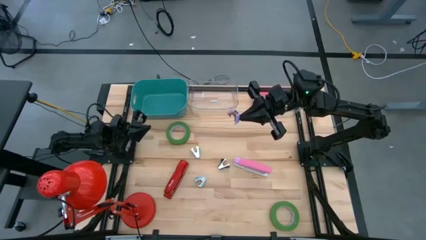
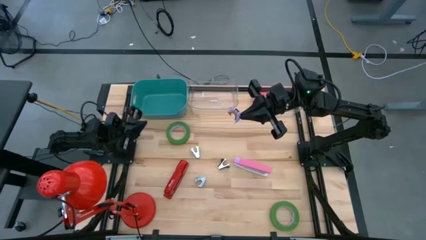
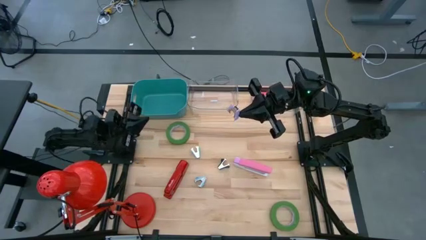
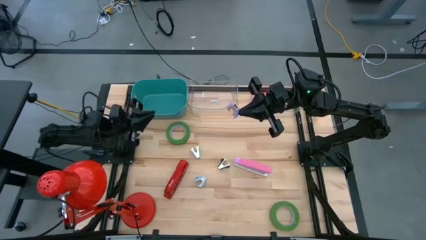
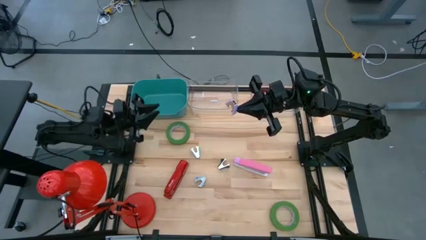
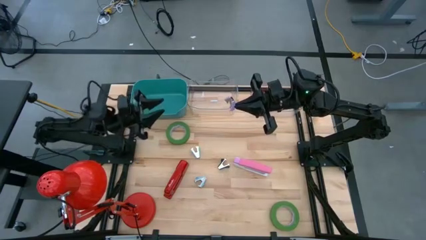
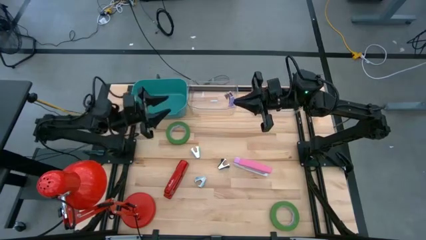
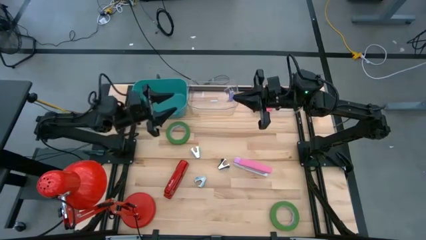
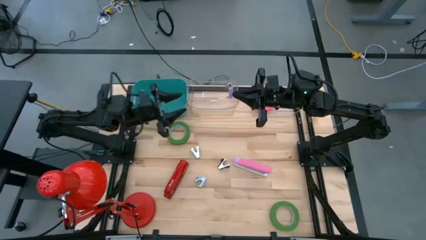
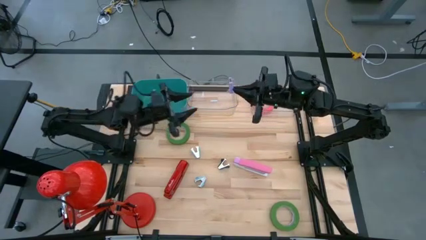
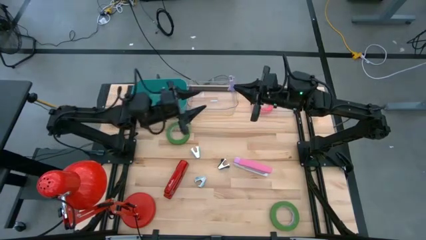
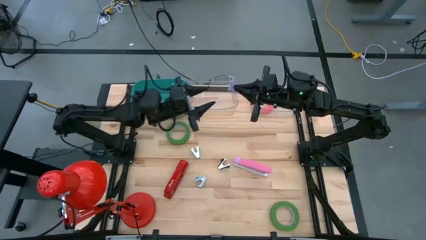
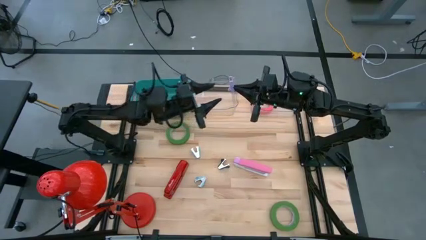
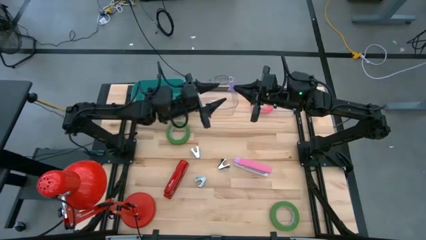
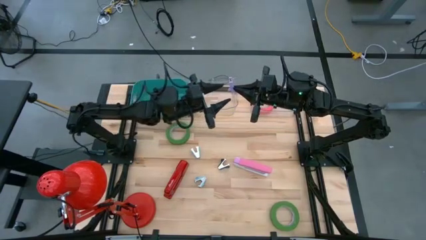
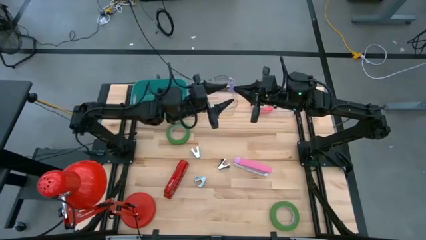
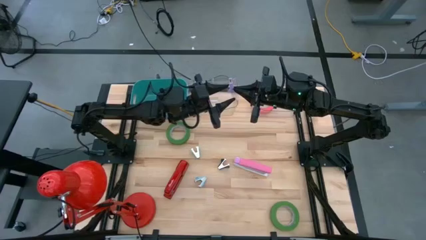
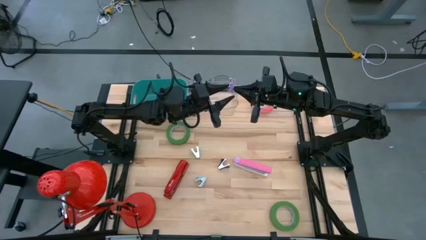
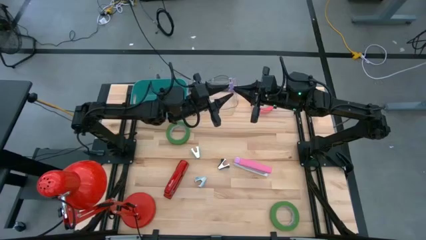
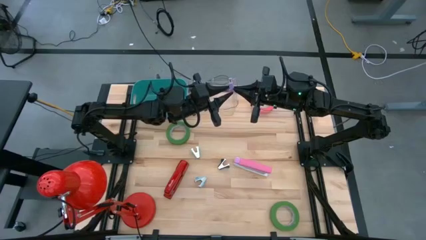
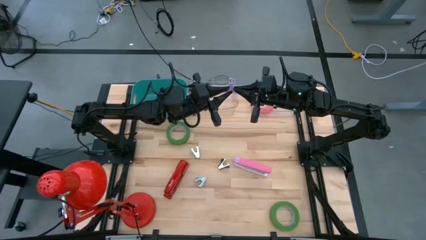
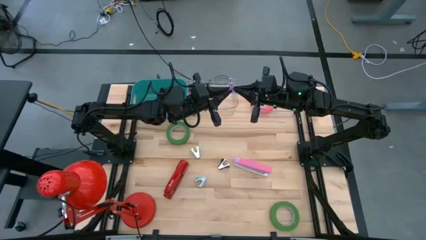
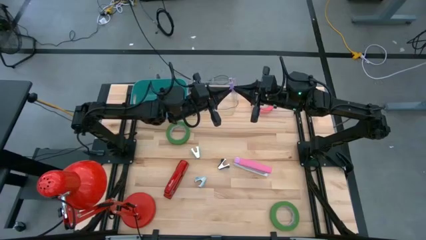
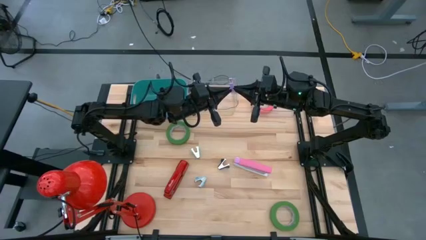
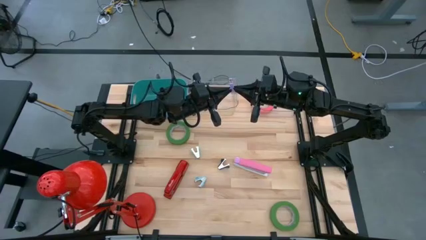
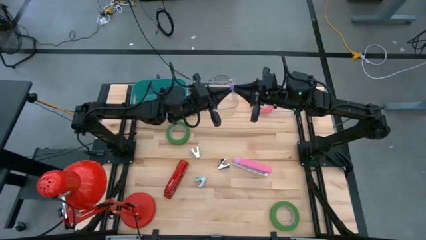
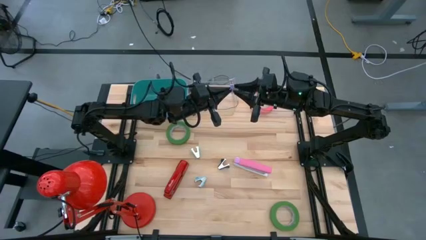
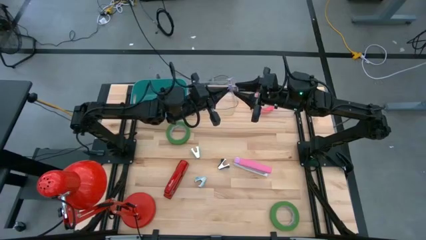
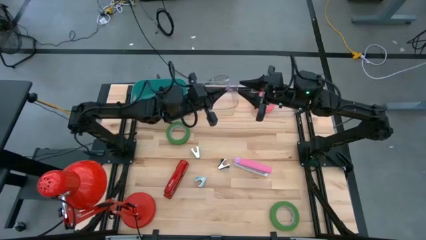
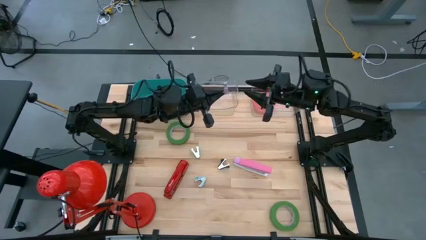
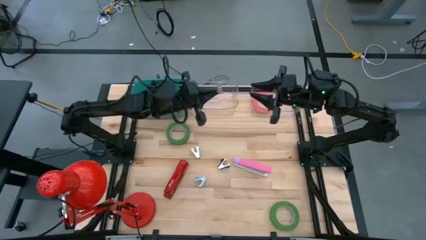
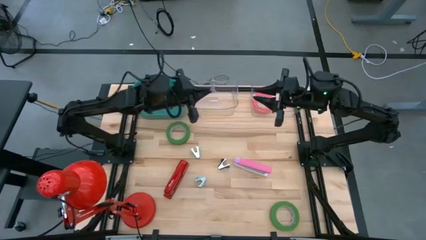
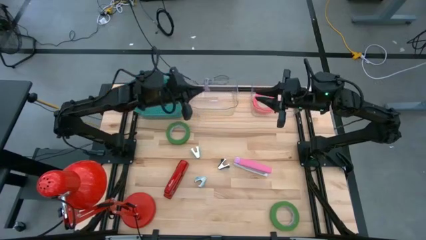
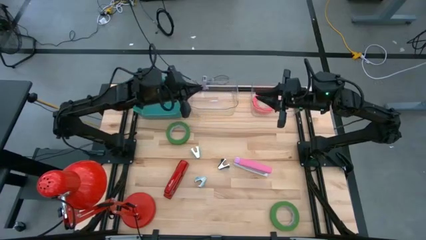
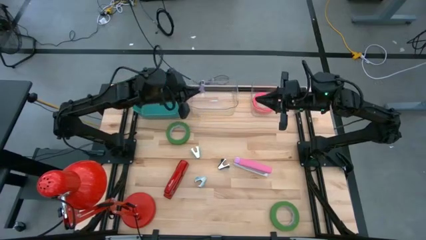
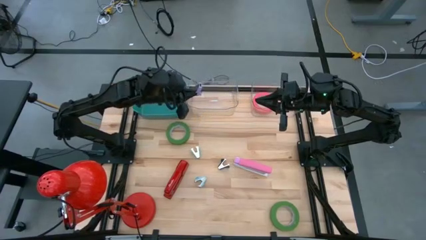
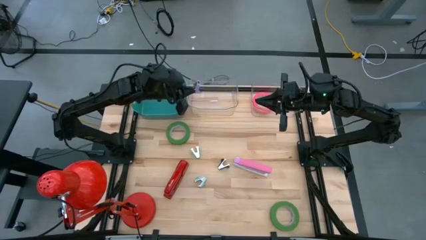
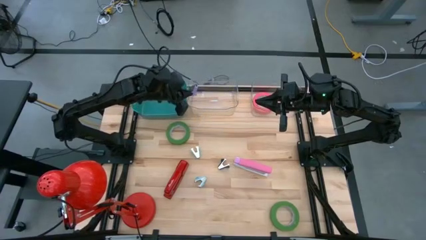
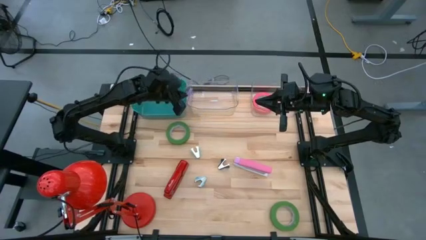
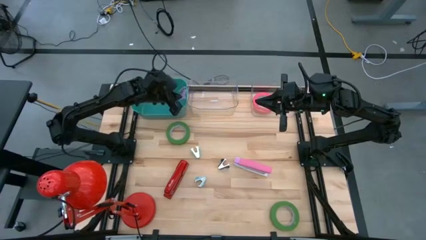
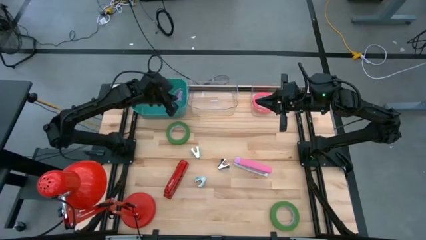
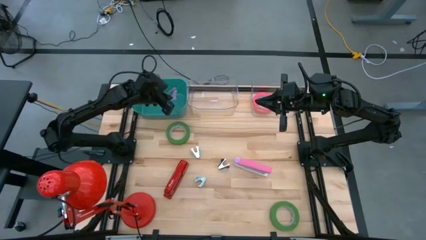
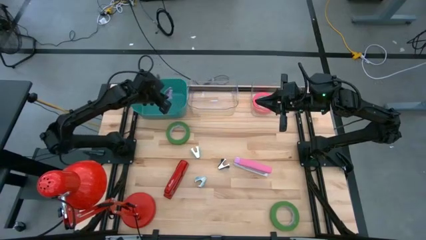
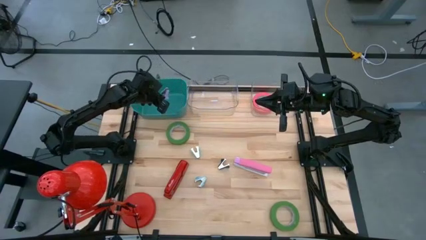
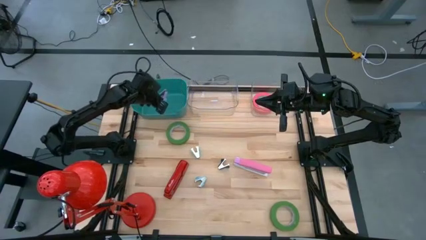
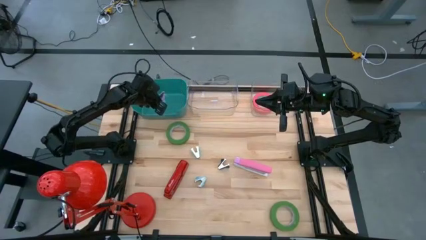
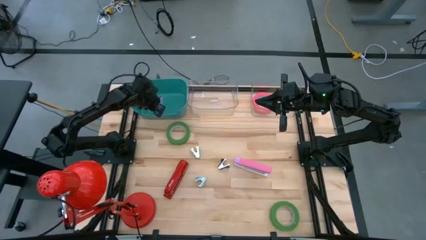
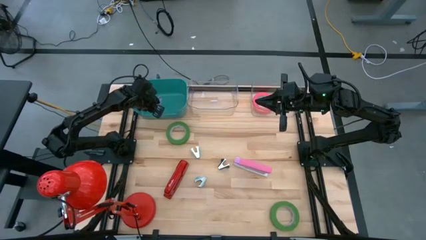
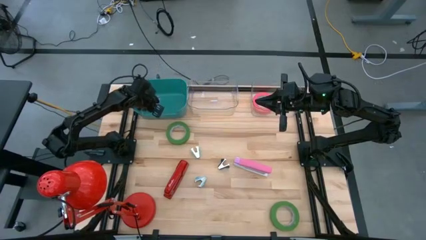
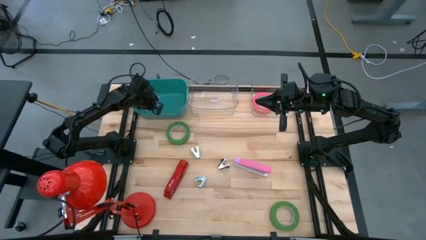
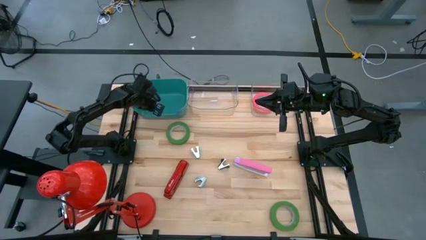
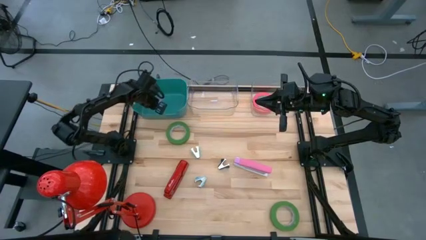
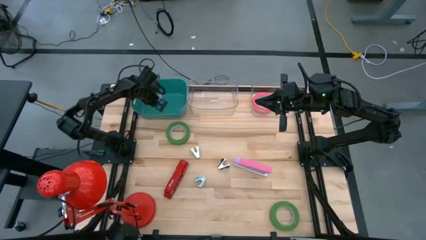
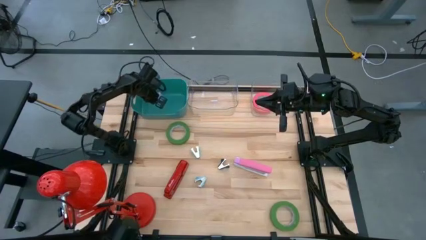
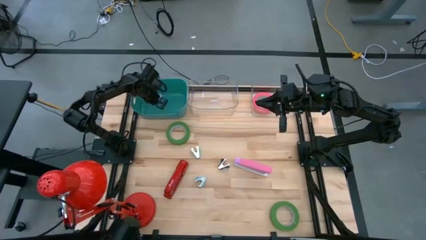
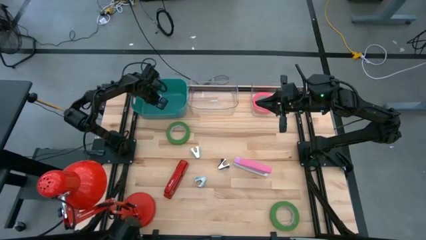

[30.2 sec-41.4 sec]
Task: Pick and place Stapler, Stapler remover, tape
Put the purple staple remover into the blue bin
